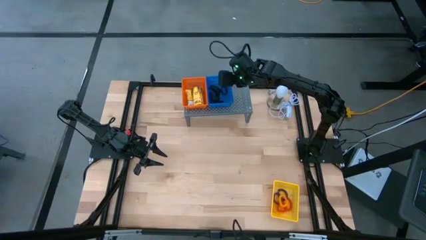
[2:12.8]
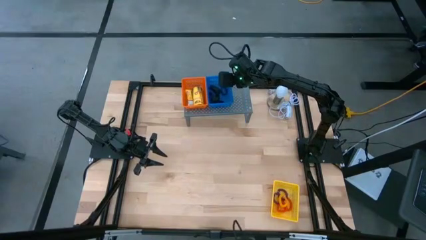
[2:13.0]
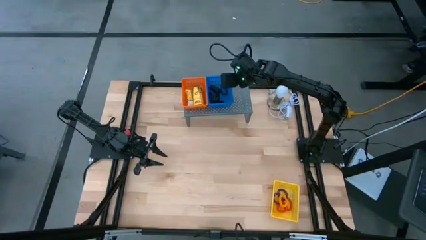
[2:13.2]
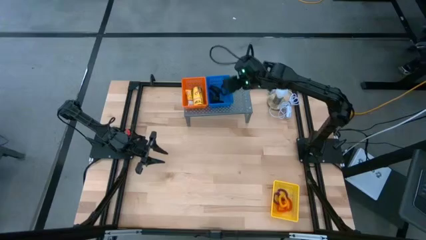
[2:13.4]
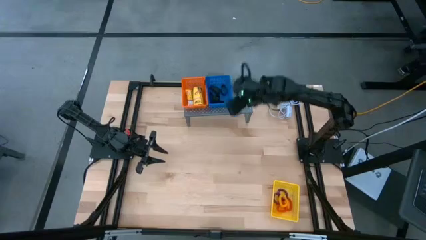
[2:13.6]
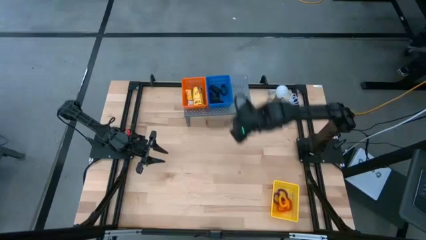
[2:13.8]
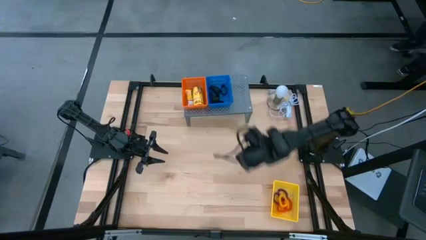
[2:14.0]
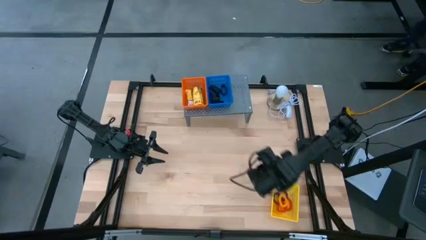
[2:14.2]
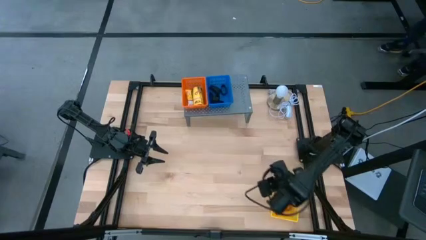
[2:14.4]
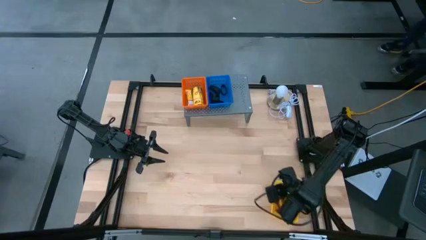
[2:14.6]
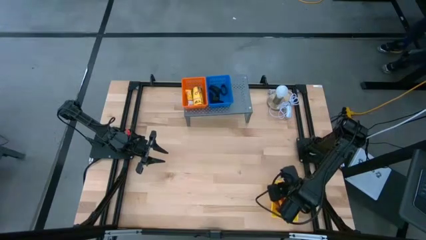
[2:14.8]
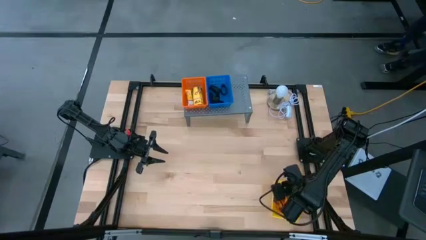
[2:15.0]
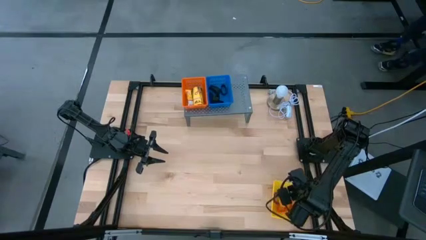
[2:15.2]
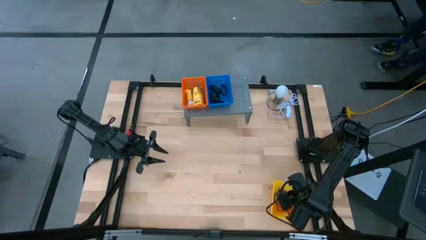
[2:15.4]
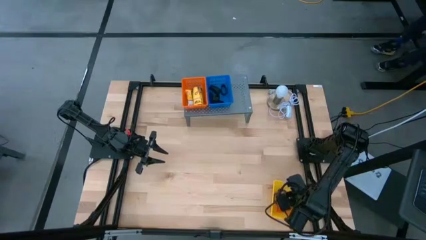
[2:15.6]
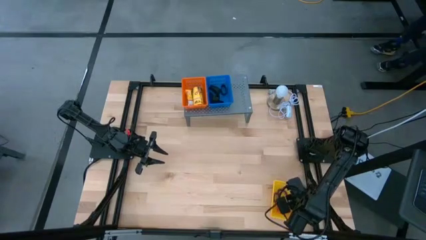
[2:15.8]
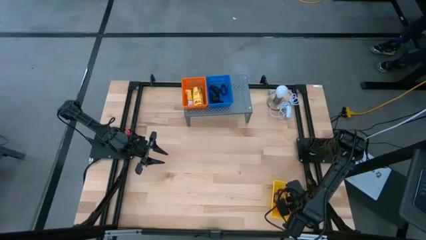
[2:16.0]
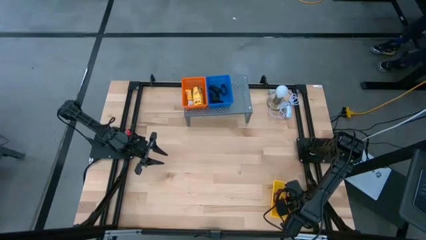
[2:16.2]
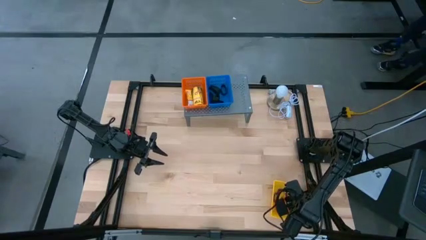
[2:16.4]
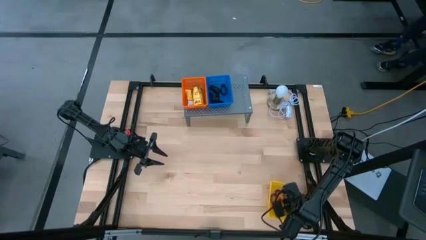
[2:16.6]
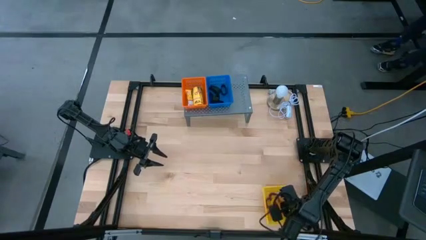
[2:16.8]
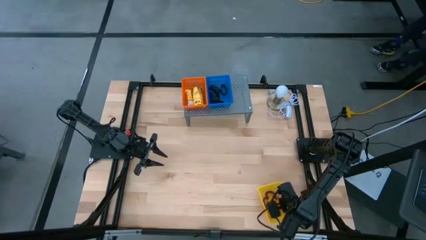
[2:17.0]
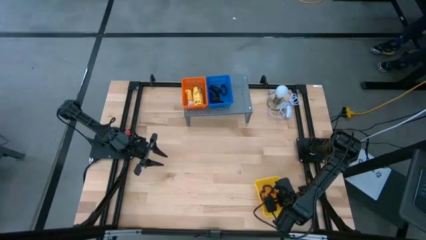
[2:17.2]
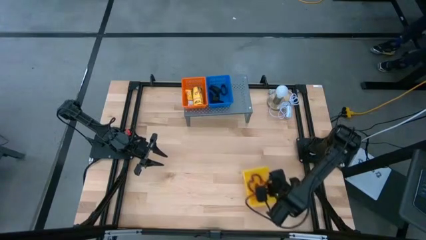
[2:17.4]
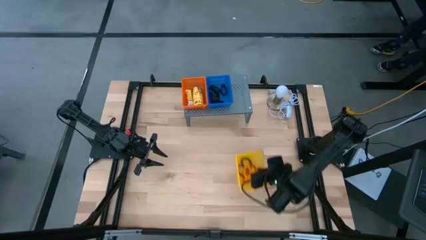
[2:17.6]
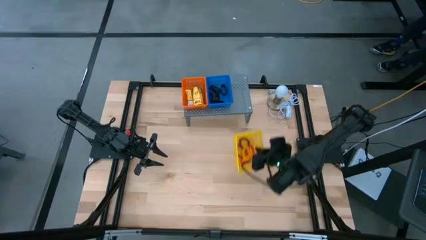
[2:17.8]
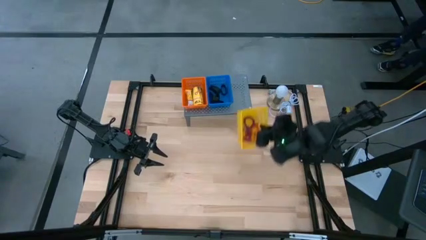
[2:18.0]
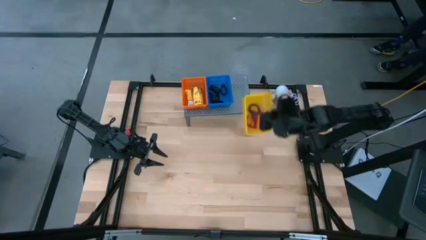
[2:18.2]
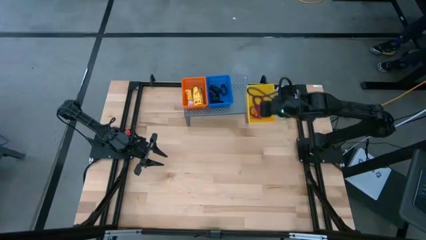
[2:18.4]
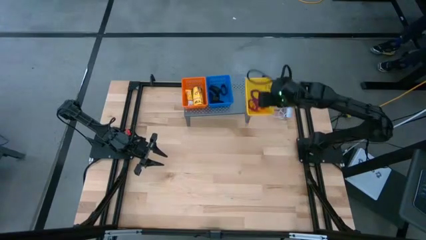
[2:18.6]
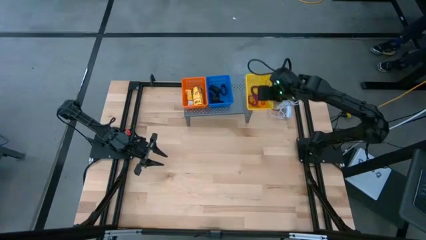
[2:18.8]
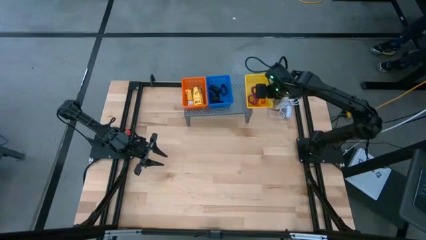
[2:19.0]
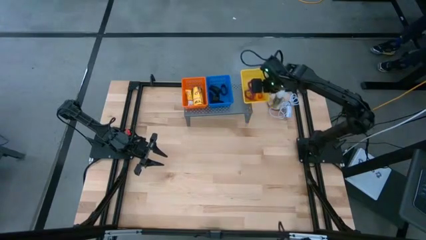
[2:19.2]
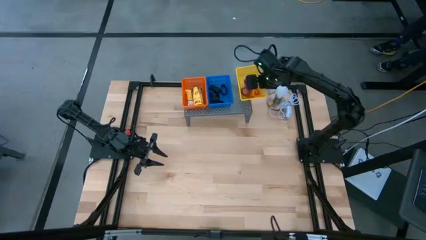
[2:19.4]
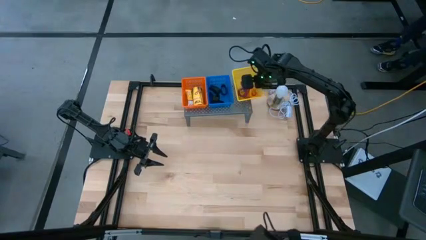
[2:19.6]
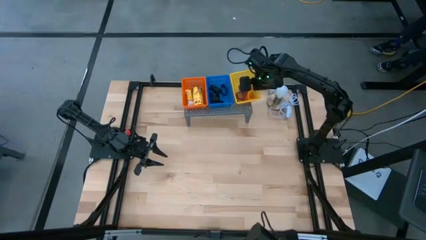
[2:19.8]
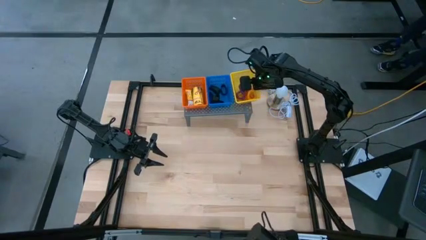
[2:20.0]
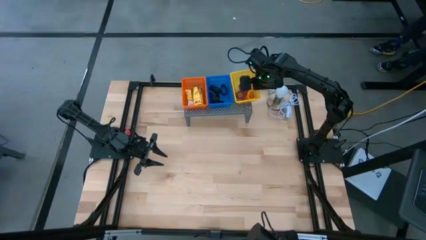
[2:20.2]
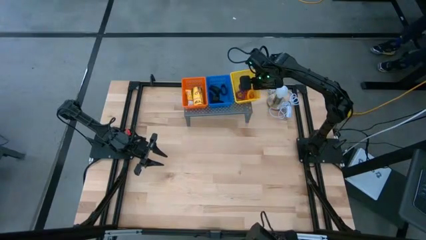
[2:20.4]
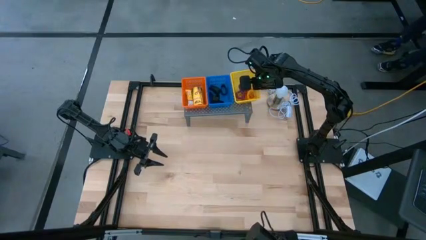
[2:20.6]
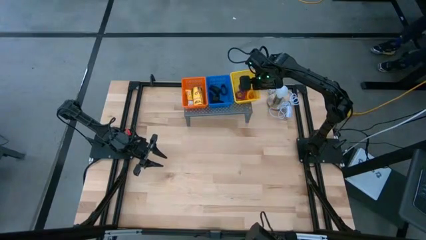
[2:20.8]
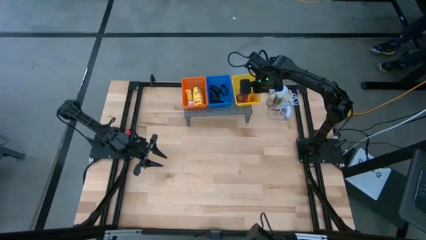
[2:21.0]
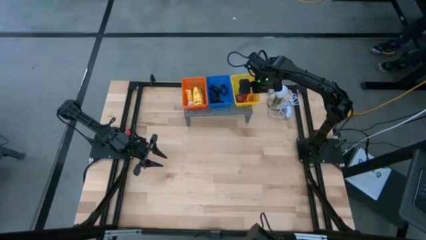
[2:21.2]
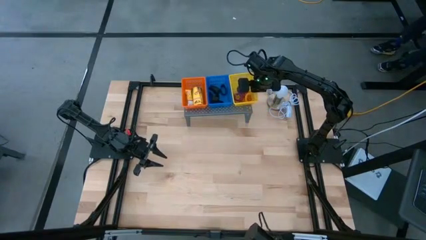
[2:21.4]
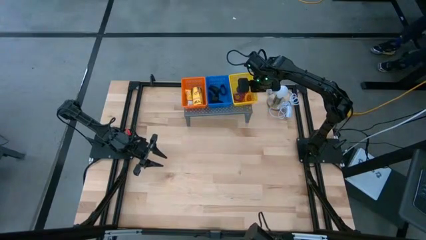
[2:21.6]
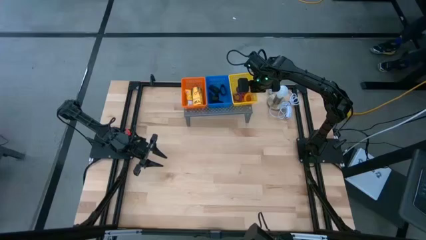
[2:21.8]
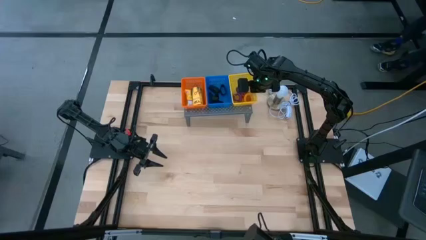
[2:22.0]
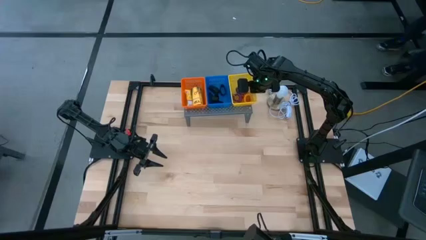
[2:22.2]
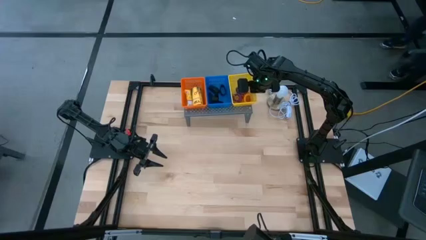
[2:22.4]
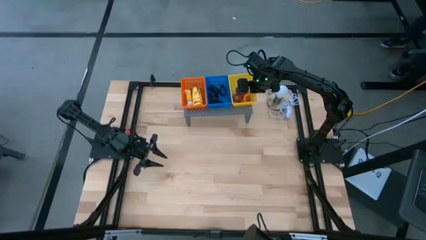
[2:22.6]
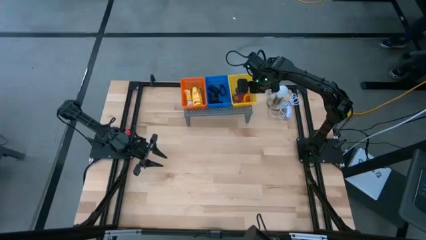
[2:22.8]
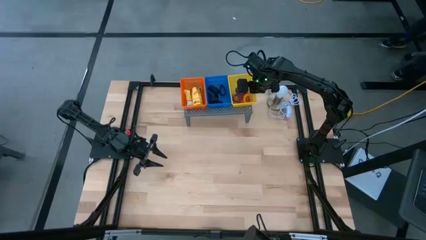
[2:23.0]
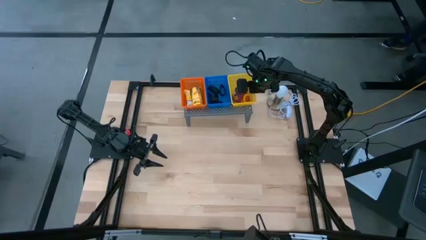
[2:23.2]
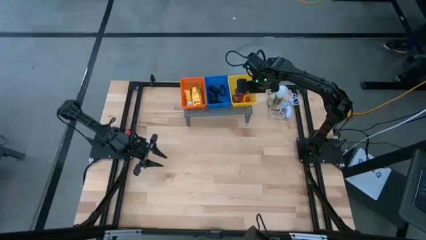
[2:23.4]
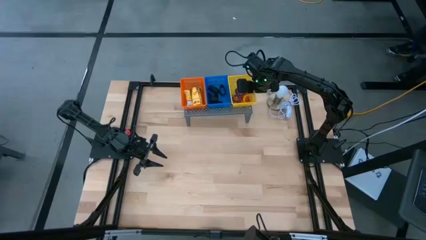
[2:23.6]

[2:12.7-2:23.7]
Task: Pick & Place Office Desk Supplies
Put the yellow bin onto the shelf

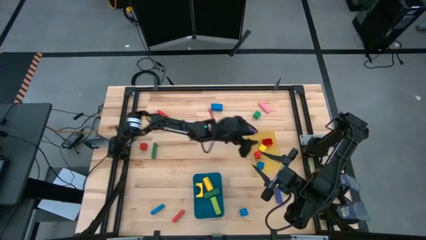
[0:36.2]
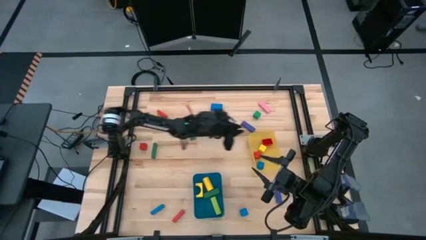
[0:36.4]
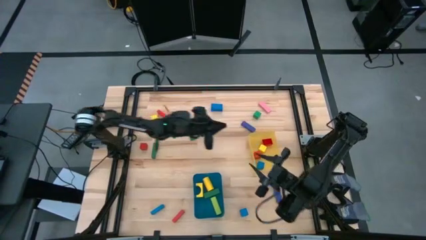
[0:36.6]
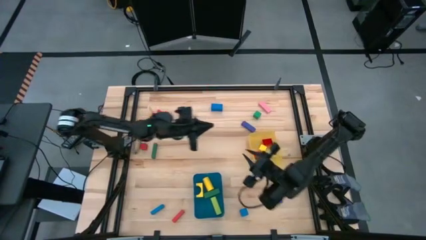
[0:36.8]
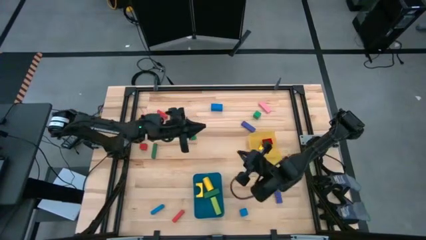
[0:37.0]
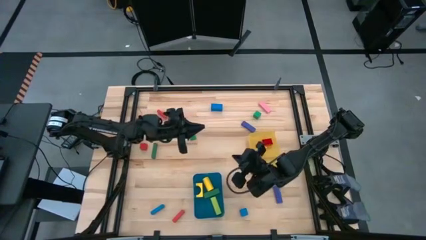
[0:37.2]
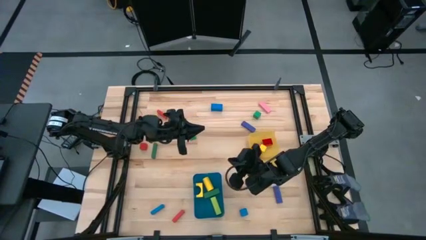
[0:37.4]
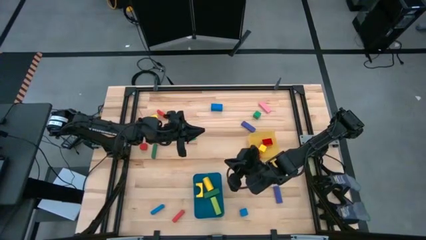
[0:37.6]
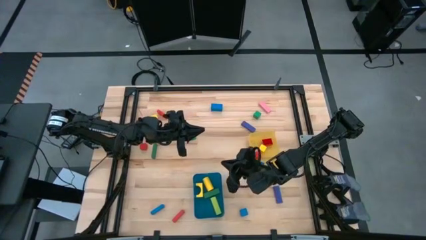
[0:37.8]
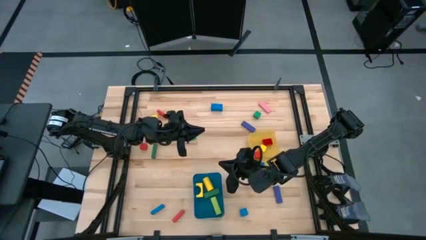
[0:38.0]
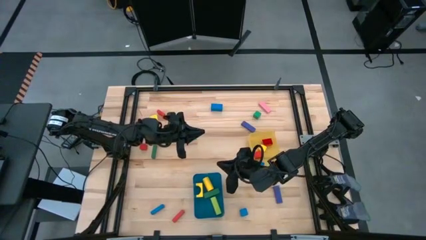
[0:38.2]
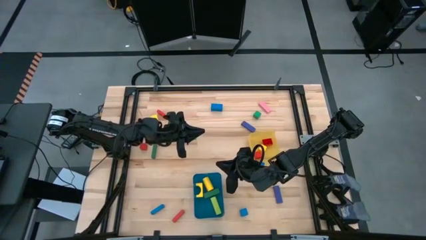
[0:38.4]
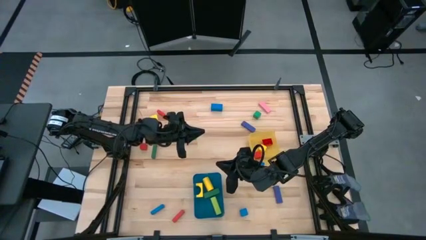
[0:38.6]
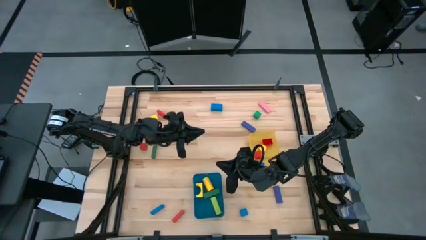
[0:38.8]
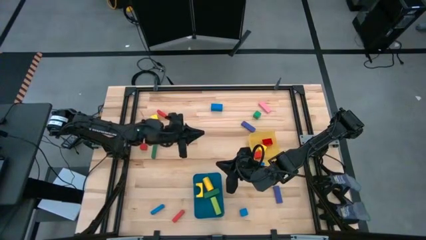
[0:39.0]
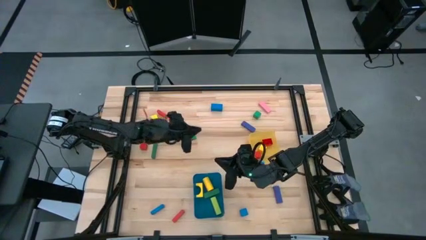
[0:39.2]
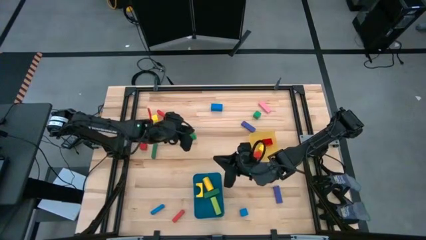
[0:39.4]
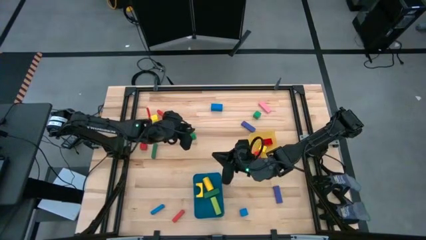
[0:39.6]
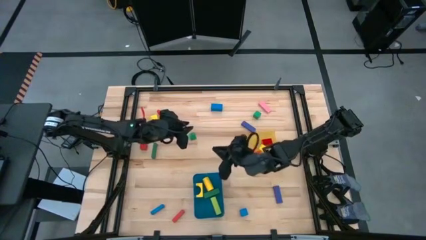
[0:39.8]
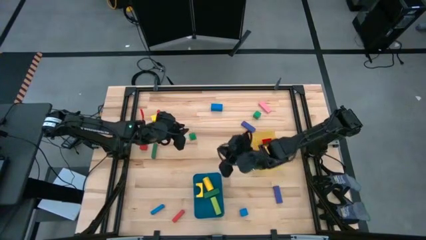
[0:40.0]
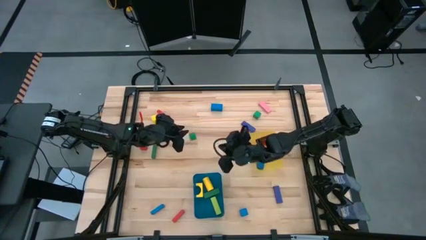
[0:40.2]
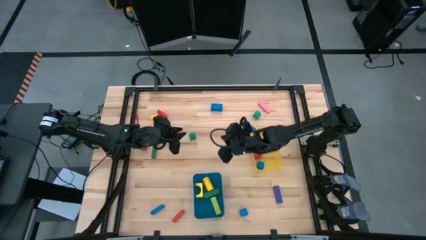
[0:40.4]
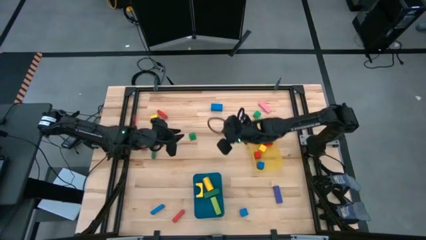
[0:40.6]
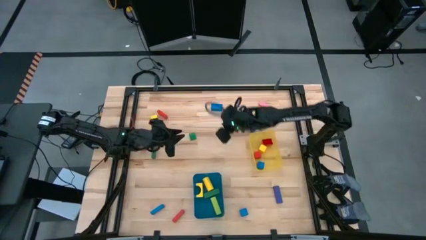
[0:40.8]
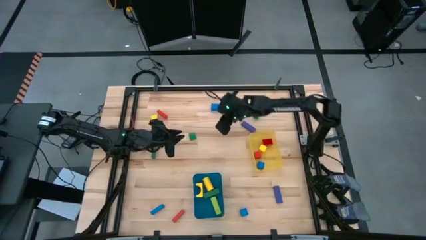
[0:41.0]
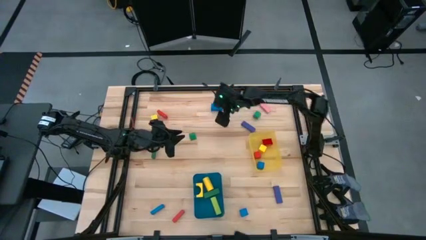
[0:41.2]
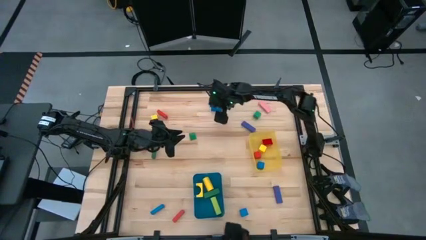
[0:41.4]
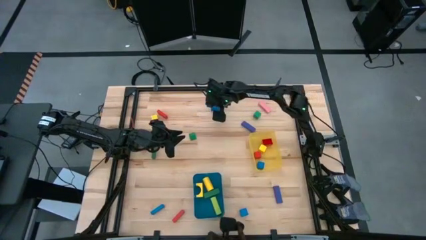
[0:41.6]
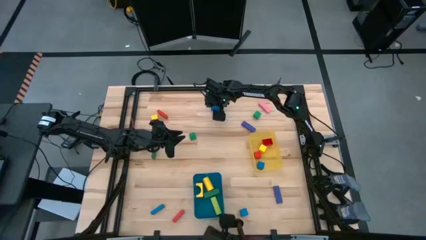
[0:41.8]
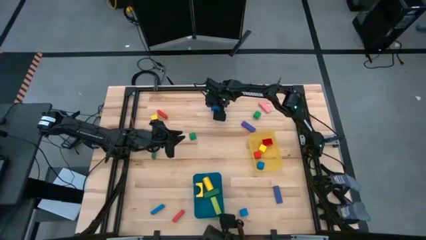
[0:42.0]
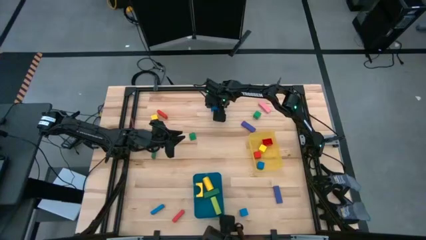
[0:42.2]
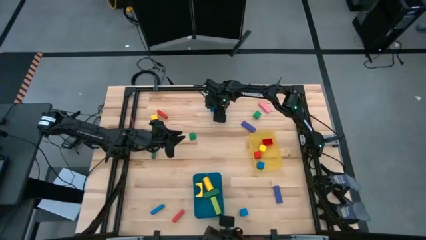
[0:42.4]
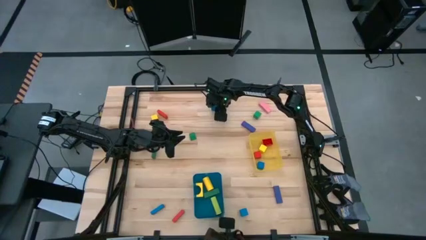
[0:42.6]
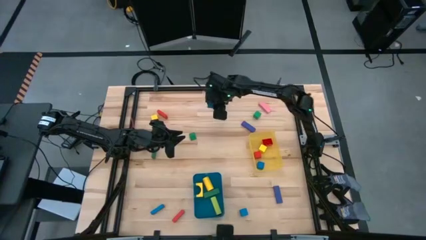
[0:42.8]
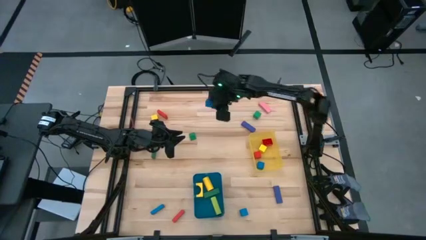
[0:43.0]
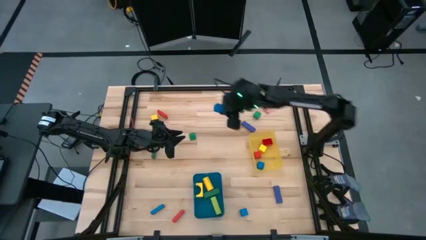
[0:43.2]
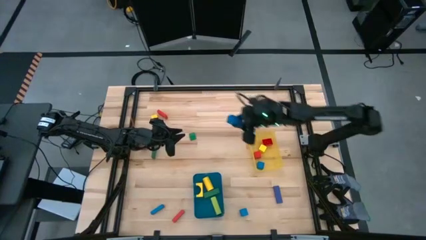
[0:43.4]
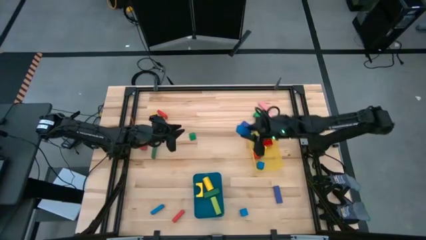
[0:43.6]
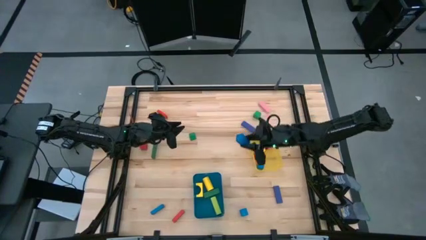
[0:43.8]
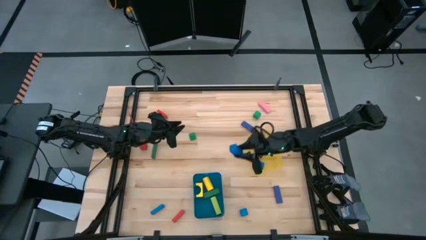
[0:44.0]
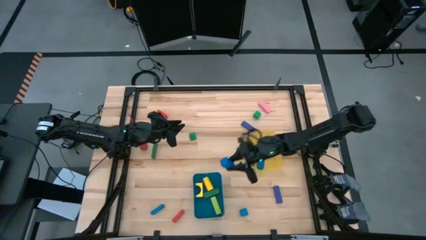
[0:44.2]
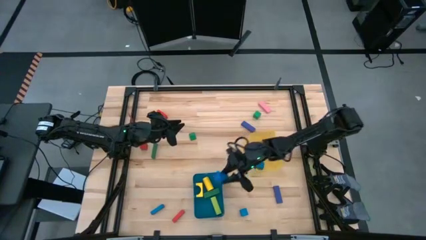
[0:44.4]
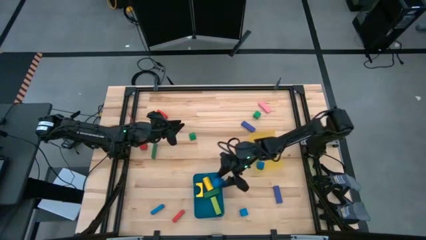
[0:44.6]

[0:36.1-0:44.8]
Task: Sort blocks by size
Put the large blue block into the blue bin
